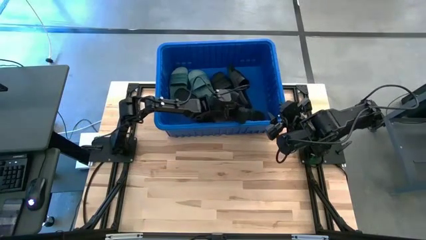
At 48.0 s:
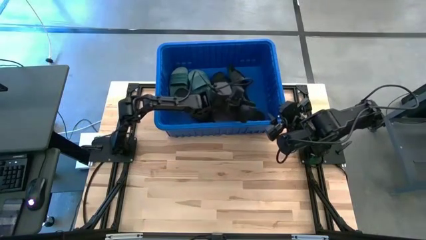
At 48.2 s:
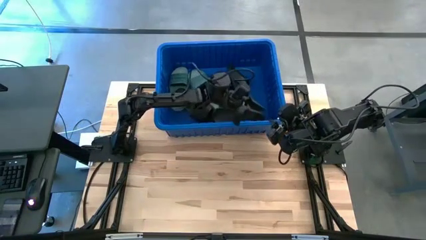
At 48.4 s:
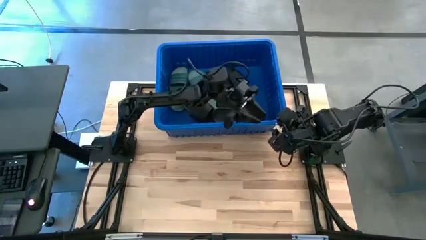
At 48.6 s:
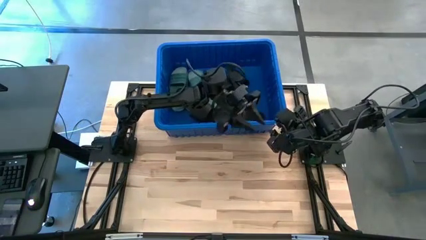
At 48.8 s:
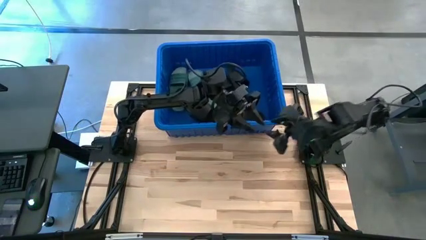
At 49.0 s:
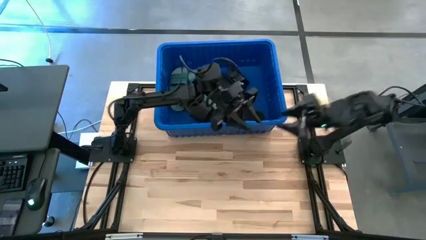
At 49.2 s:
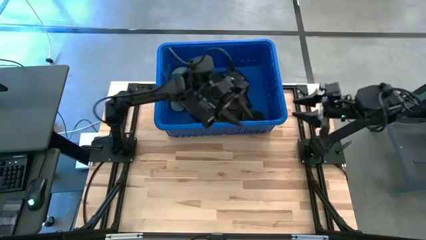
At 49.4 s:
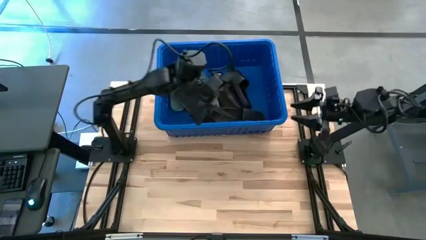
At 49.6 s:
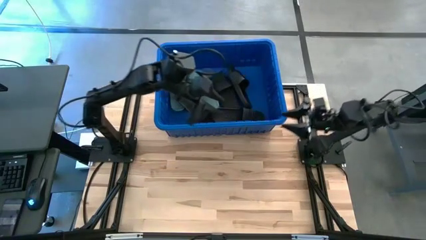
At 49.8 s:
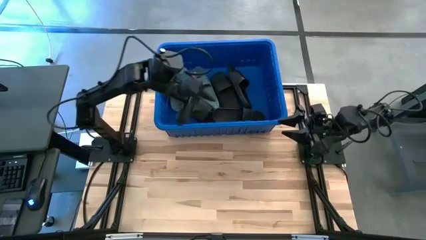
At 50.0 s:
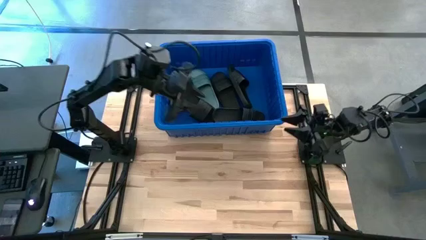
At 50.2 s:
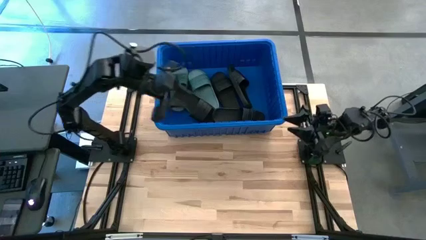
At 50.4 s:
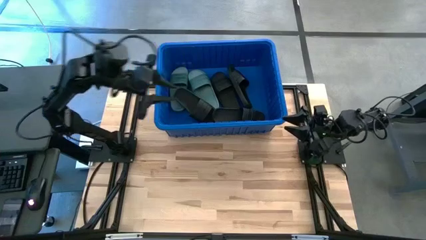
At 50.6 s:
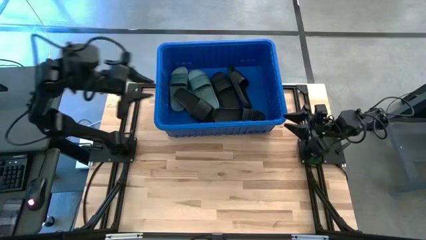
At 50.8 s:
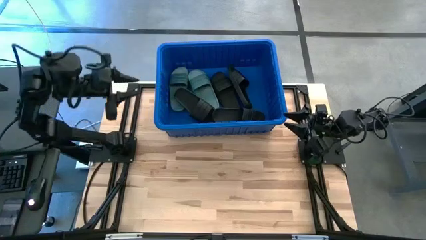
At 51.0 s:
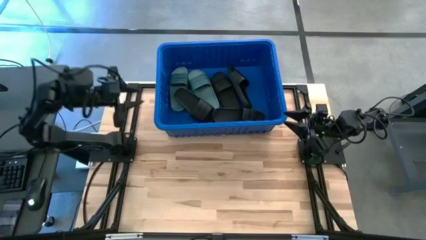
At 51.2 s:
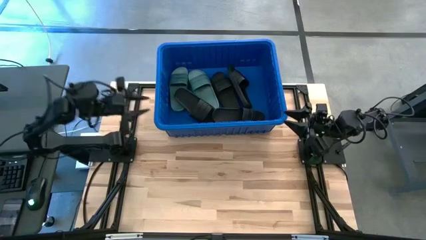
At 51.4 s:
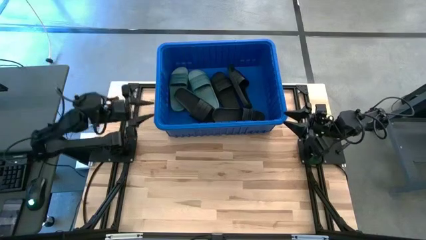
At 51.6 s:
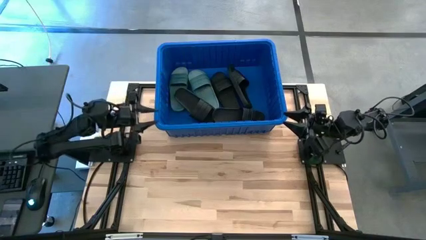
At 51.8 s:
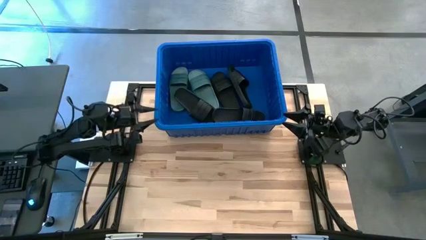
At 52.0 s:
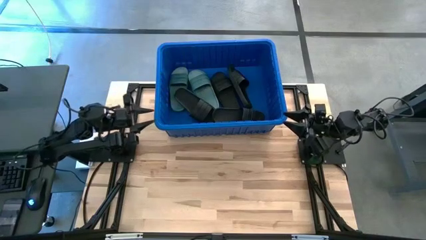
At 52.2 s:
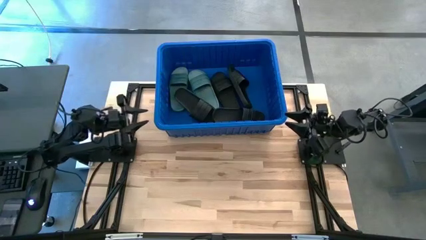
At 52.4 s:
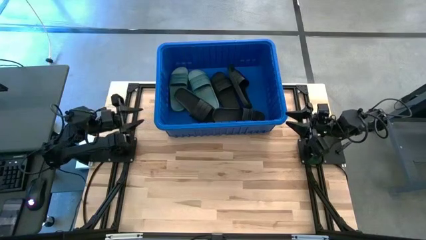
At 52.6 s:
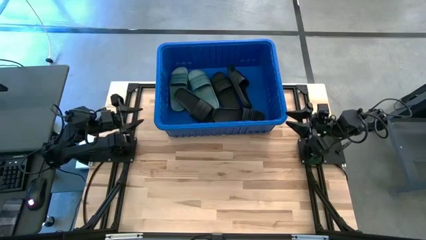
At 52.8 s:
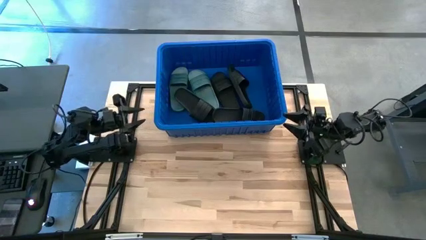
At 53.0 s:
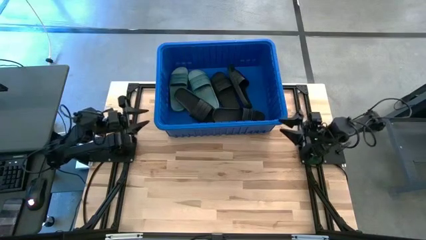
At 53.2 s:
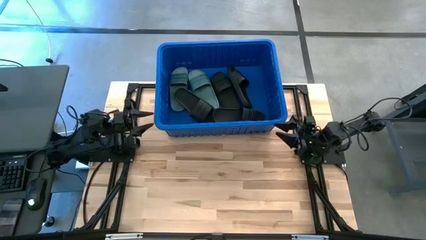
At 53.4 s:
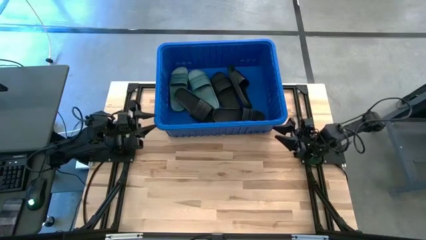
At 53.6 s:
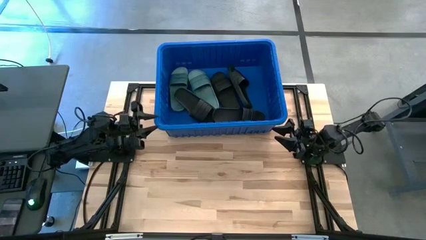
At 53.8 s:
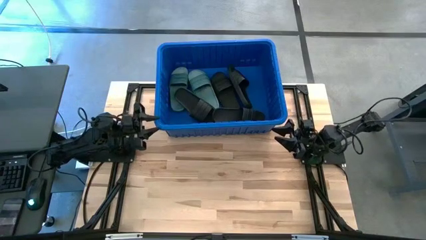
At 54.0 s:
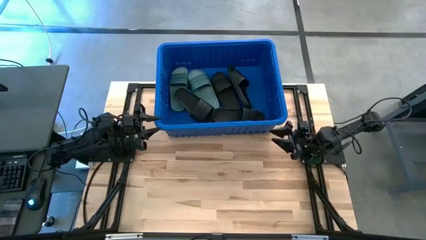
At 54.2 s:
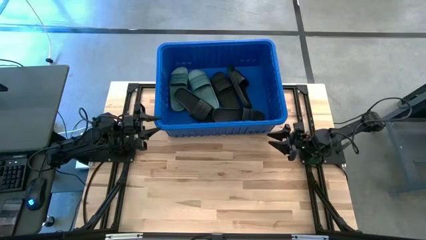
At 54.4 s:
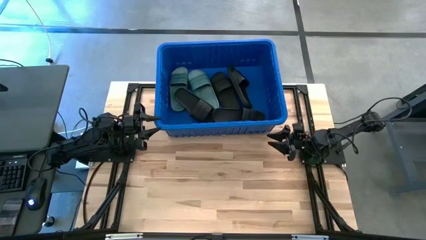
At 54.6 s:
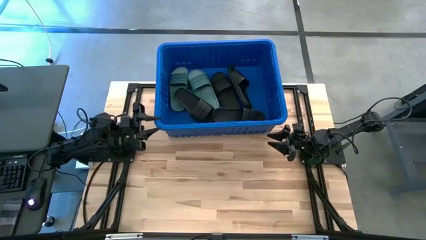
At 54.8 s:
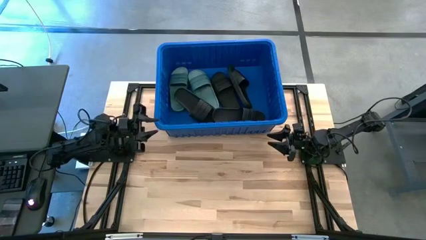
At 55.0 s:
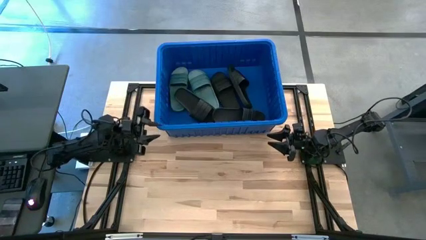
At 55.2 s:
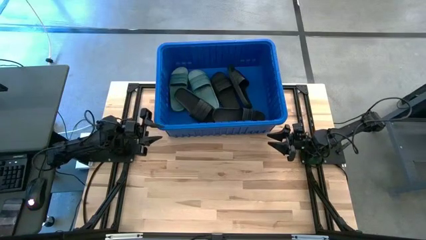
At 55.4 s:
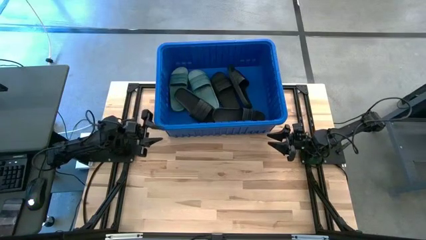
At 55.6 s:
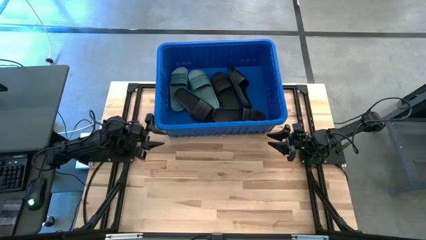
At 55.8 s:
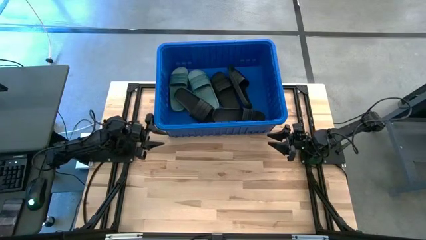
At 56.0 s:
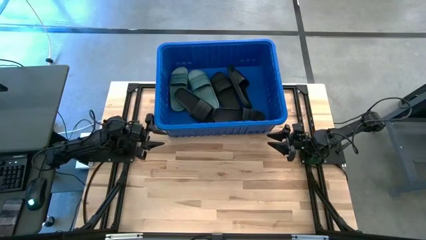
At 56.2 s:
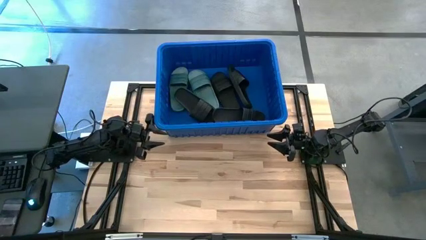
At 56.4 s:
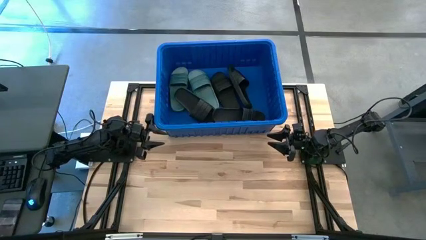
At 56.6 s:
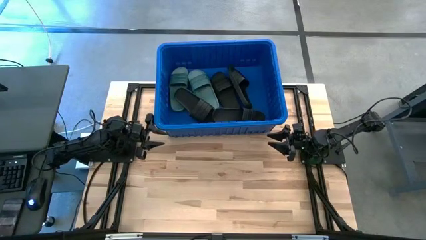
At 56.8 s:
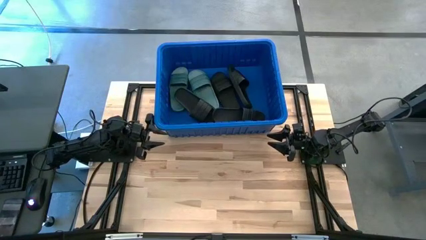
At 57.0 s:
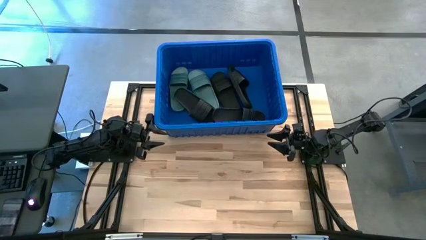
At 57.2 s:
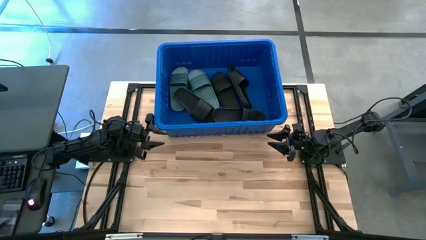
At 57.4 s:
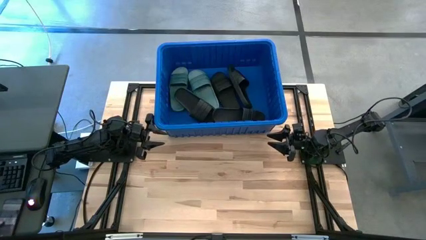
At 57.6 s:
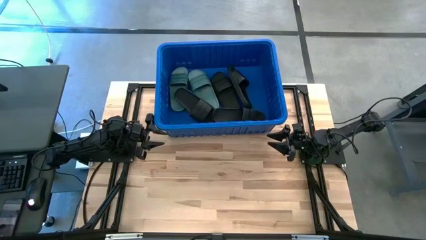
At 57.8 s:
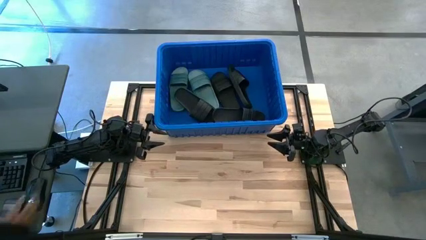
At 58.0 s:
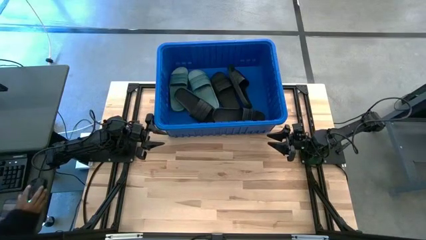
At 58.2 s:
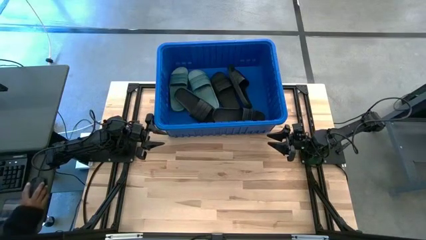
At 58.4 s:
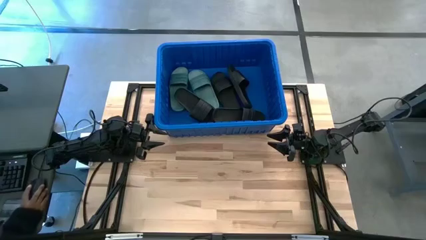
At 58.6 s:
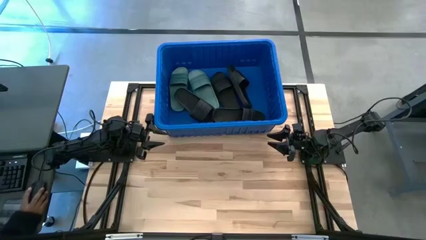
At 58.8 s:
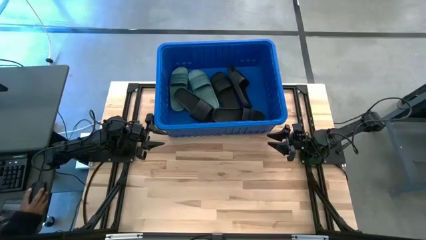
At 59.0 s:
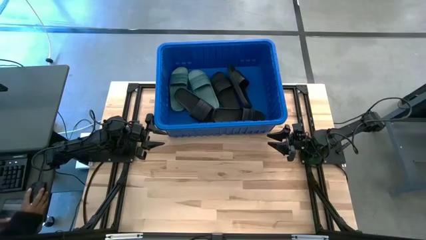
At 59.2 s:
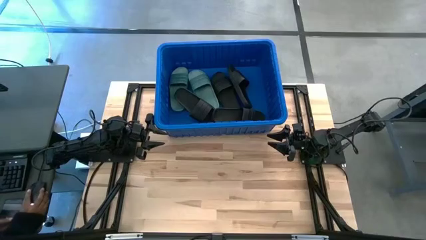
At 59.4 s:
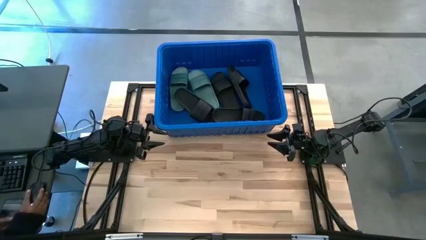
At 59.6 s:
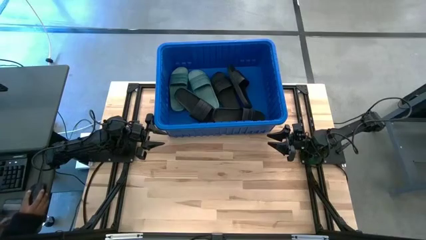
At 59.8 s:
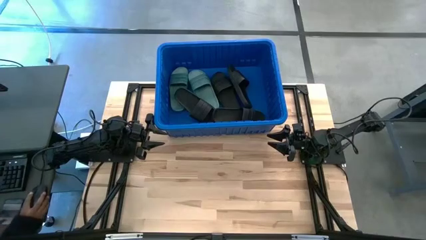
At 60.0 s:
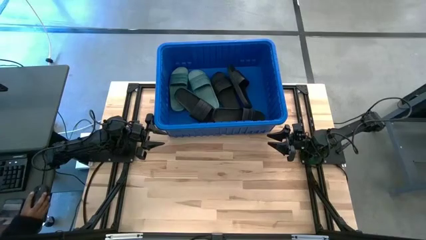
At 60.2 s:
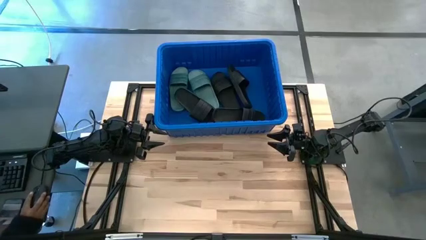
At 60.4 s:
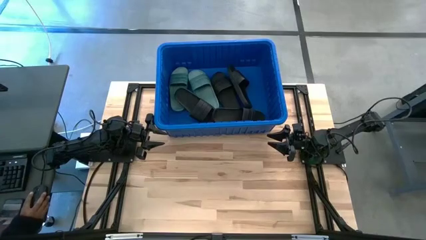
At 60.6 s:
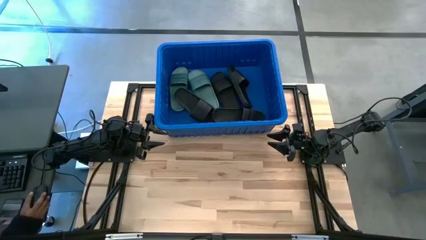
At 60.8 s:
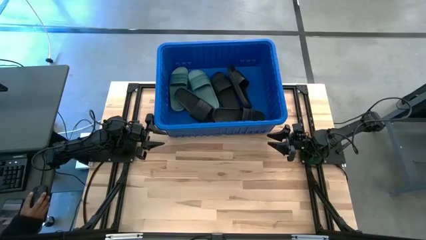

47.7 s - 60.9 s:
Task: Pick and place slides into bin
Return to Home Position

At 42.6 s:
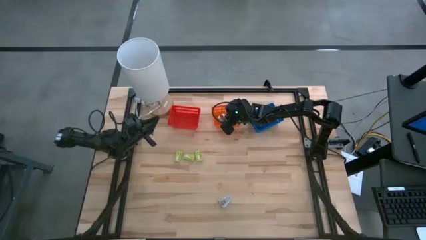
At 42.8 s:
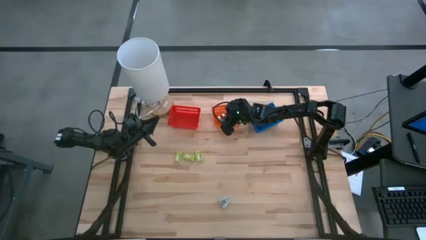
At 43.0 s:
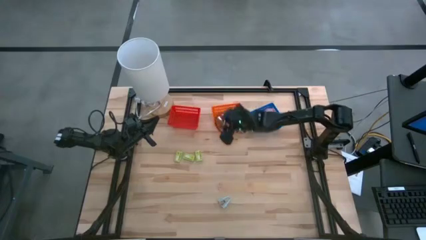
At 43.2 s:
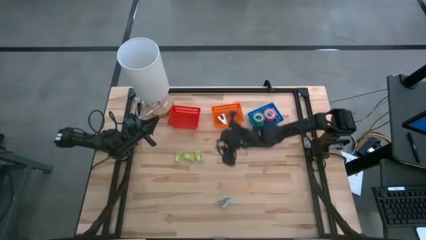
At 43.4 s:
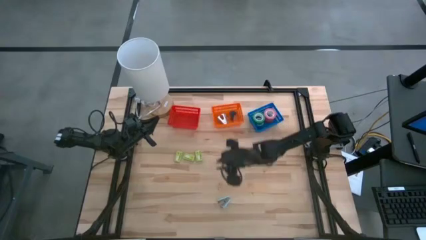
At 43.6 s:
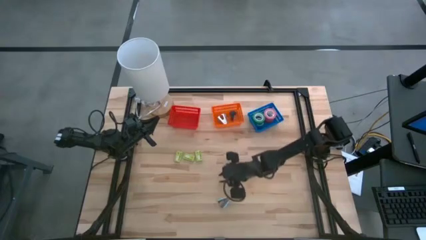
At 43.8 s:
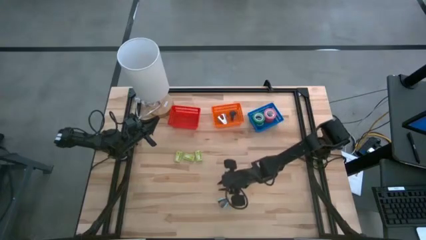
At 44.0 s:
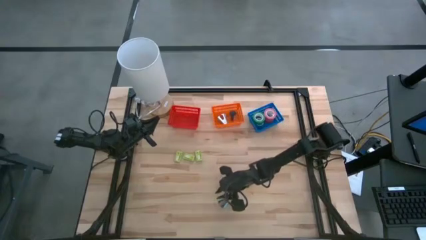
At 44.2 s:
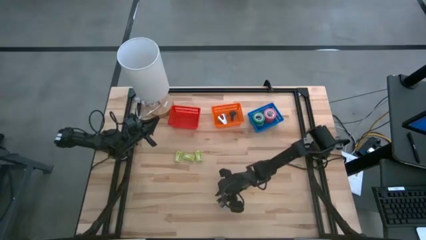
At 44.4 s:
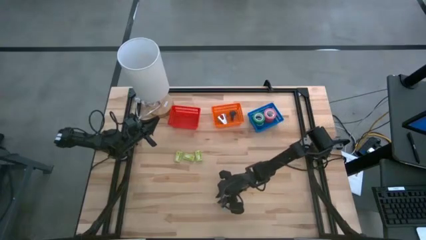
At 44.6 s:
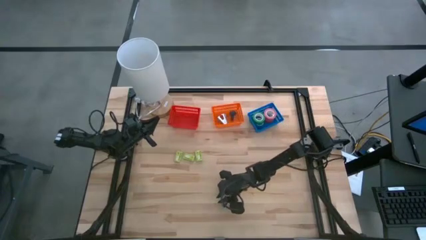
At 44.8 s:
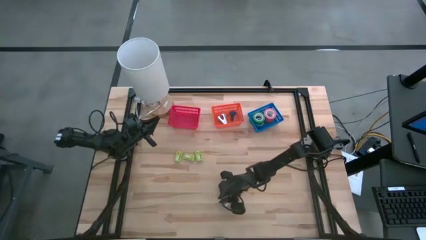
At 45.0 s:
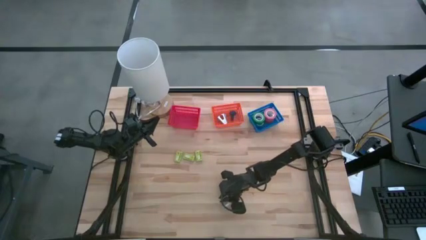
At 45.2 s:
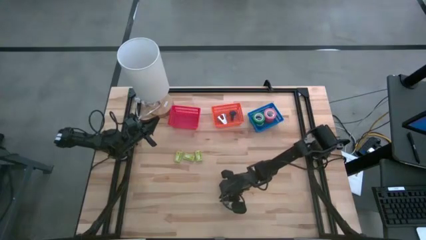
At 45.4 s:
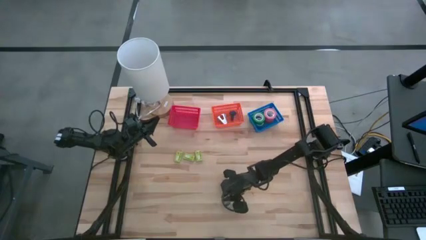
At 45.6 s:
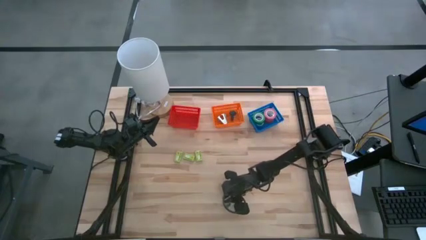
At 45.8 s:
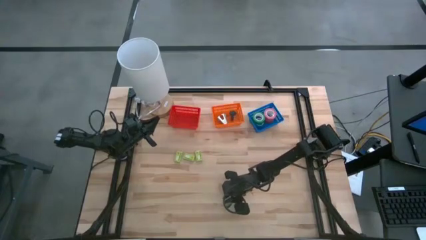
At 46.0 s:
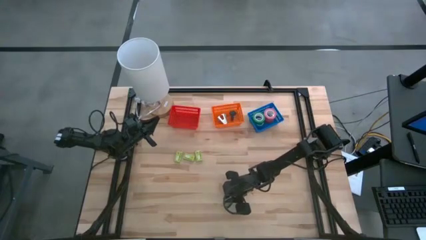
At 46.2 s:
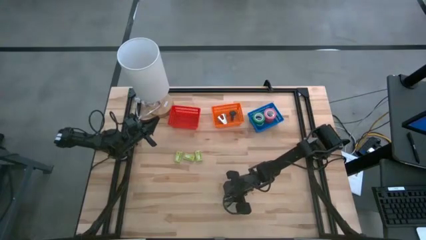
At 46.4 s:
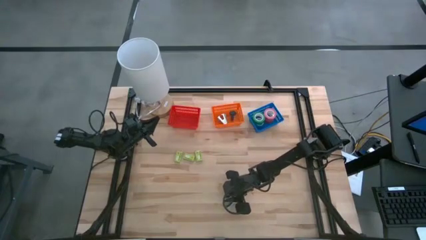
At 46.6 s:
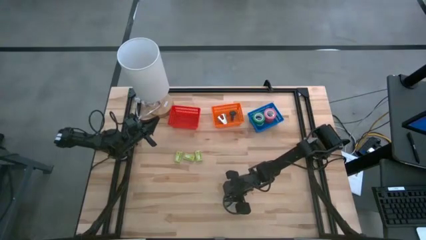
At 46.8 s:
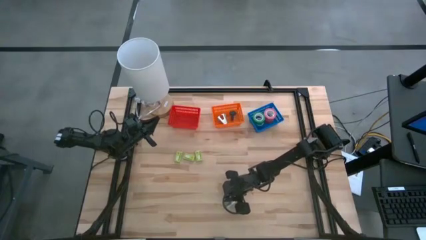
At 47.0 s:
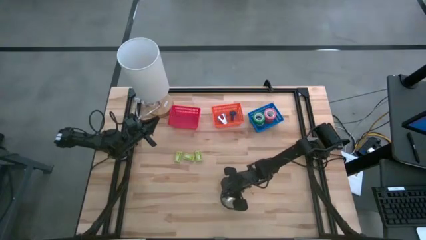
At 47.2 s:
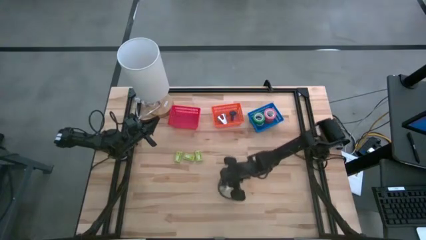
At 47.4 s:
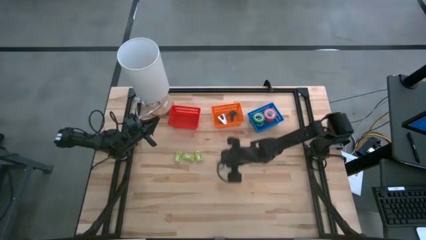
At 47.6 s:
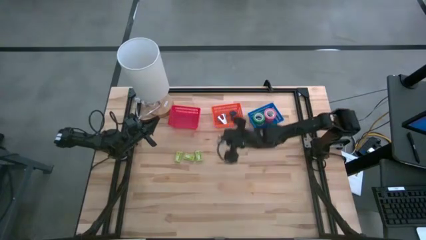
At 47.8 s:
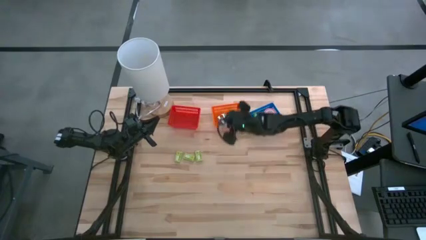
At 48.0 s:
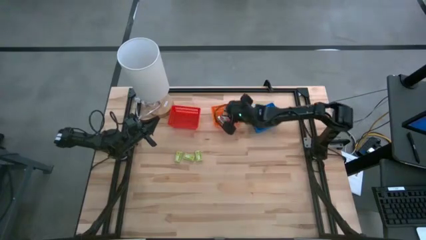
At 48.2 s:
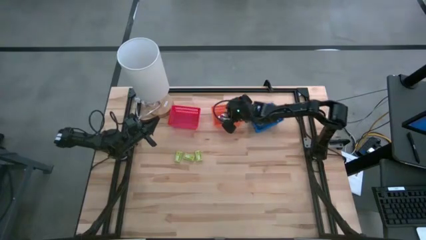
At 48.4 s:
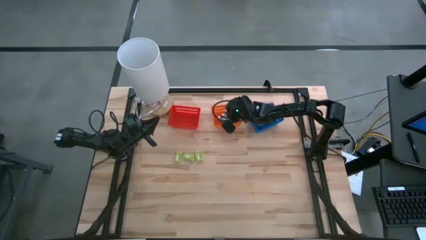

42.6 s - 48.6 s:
Task: Pick and place Stapler, Stapler remover, tape
Put the blue staple remover into the orange bin
